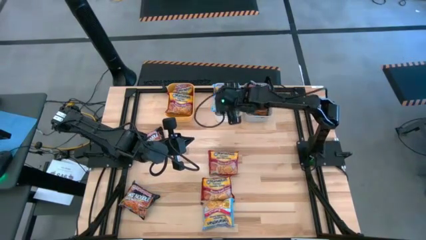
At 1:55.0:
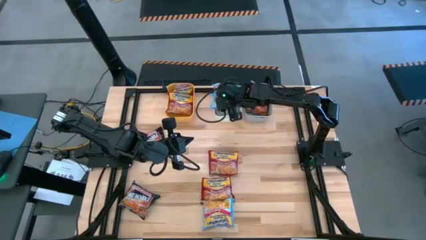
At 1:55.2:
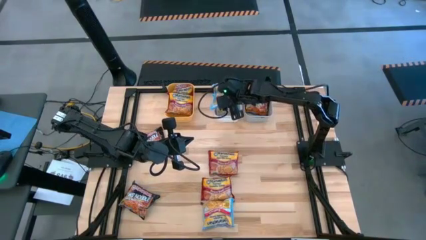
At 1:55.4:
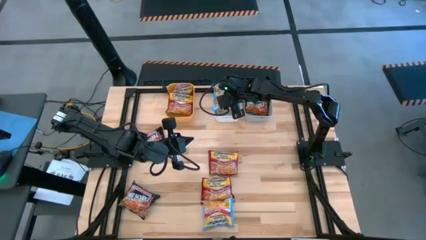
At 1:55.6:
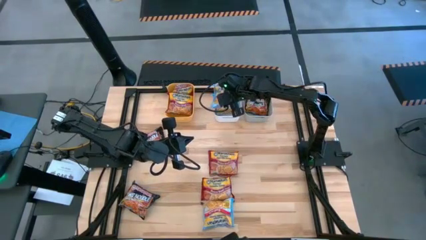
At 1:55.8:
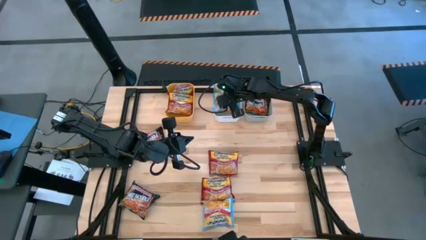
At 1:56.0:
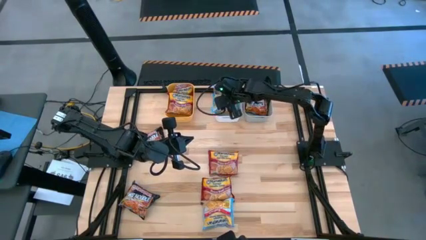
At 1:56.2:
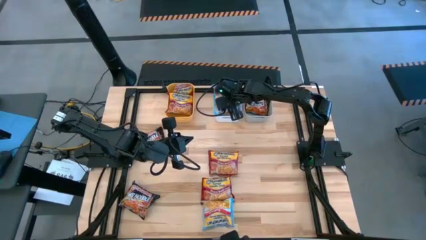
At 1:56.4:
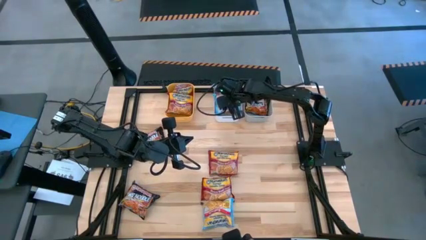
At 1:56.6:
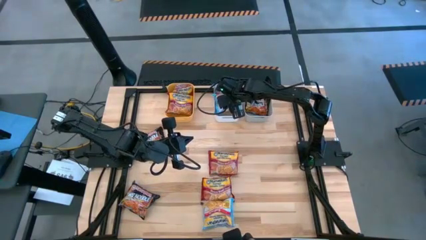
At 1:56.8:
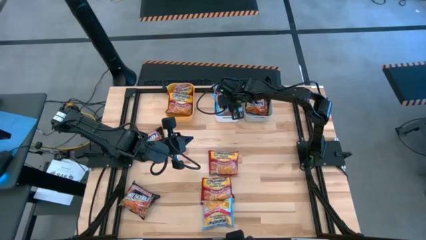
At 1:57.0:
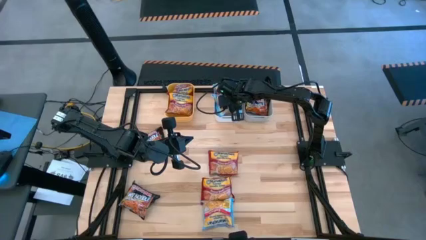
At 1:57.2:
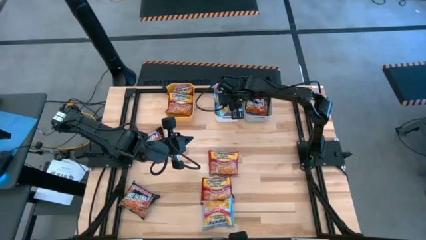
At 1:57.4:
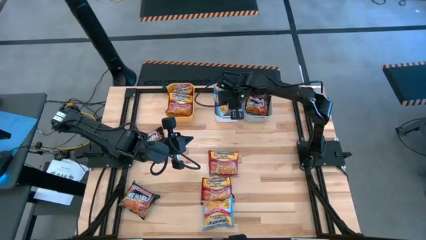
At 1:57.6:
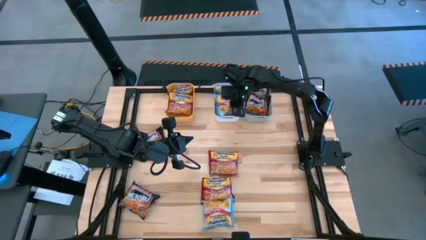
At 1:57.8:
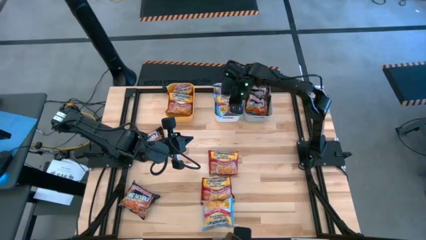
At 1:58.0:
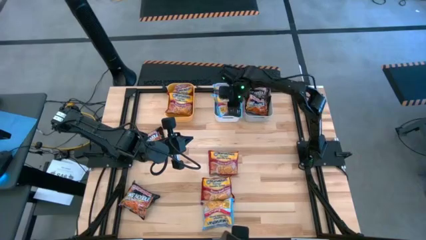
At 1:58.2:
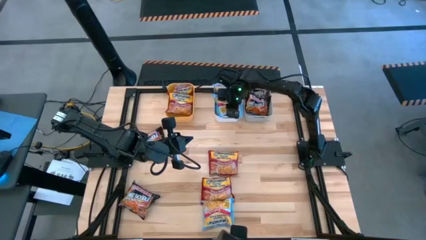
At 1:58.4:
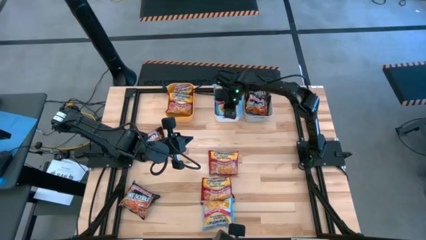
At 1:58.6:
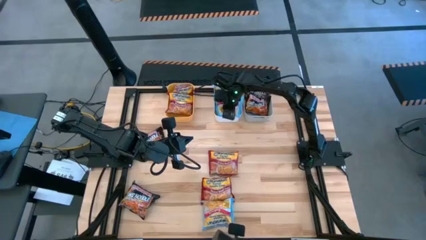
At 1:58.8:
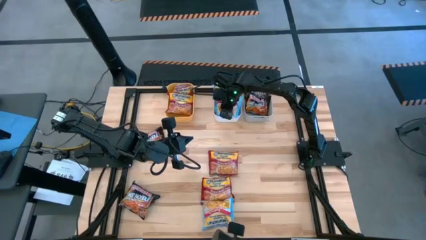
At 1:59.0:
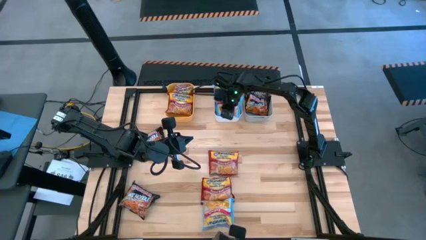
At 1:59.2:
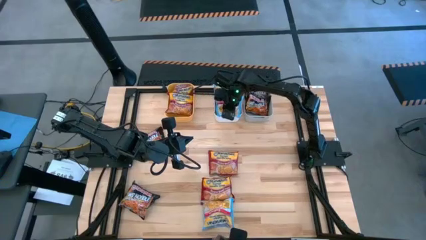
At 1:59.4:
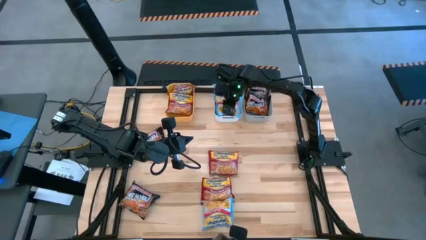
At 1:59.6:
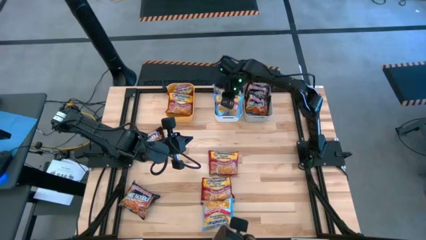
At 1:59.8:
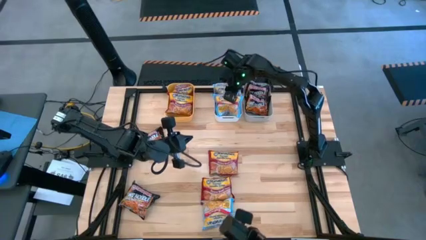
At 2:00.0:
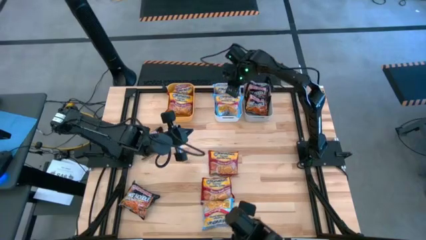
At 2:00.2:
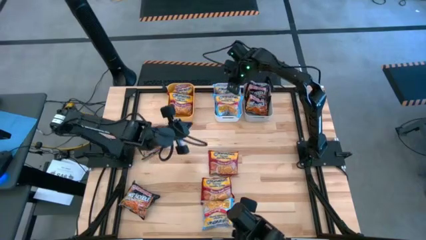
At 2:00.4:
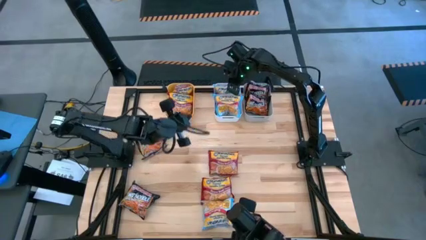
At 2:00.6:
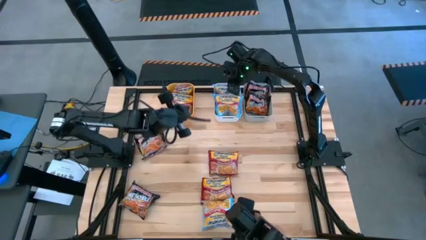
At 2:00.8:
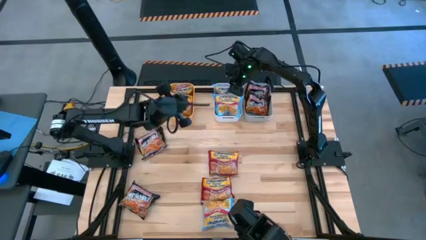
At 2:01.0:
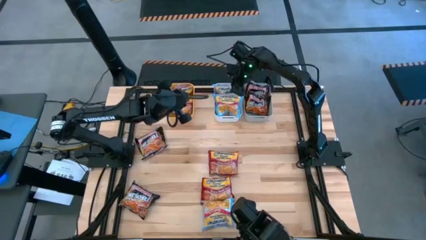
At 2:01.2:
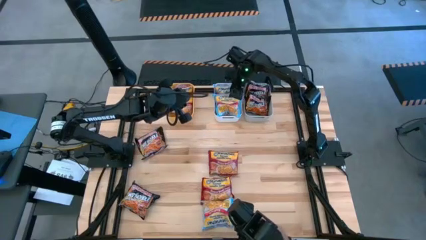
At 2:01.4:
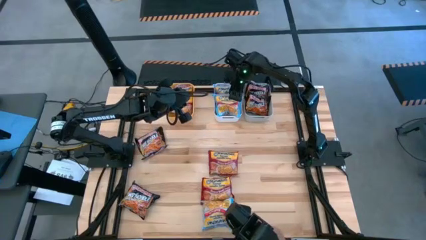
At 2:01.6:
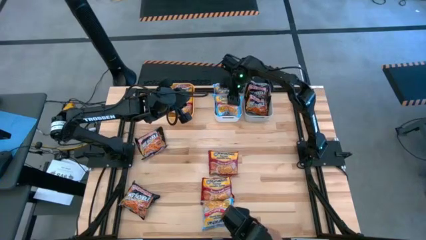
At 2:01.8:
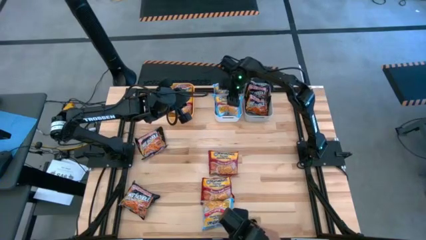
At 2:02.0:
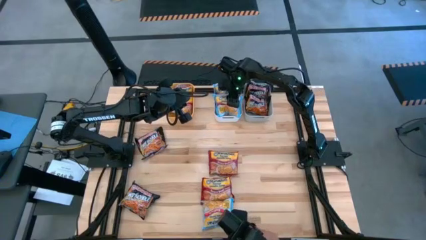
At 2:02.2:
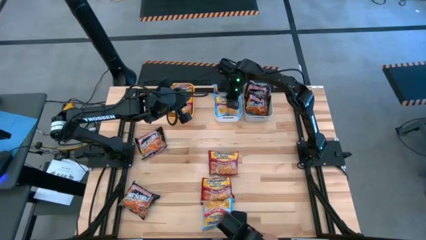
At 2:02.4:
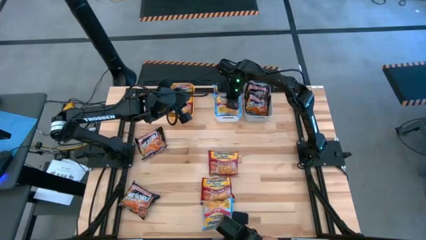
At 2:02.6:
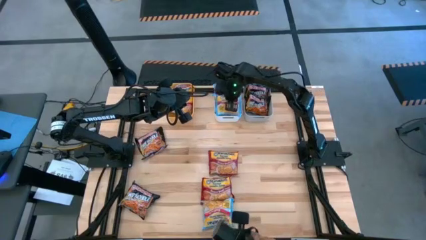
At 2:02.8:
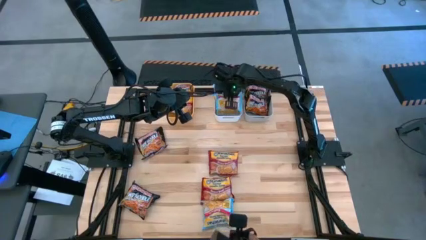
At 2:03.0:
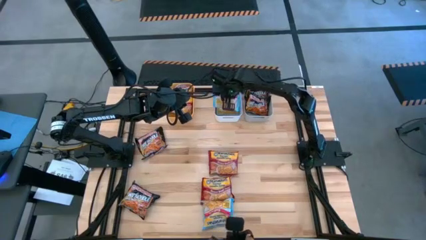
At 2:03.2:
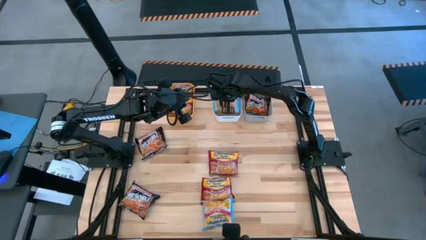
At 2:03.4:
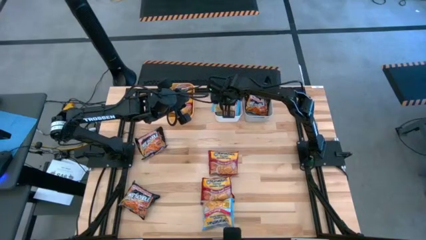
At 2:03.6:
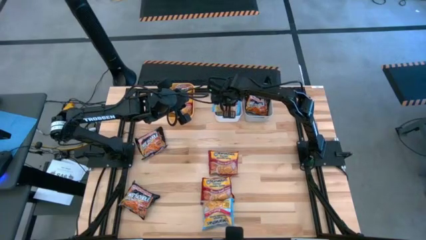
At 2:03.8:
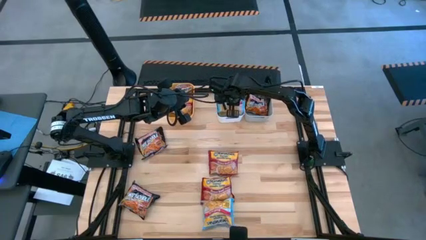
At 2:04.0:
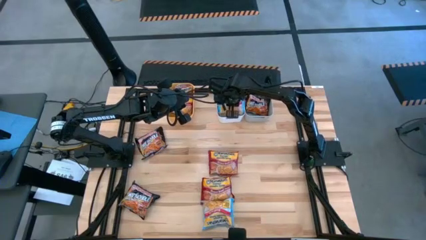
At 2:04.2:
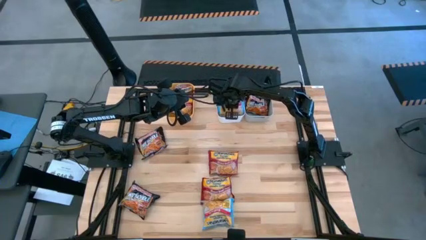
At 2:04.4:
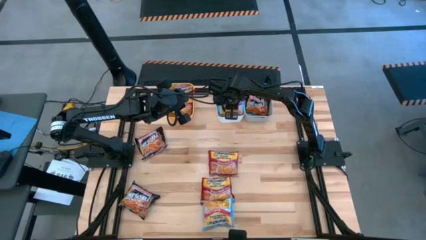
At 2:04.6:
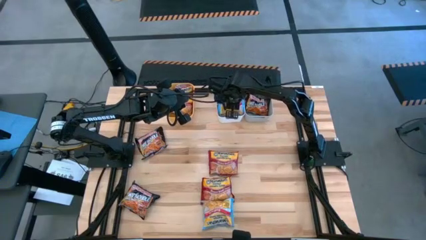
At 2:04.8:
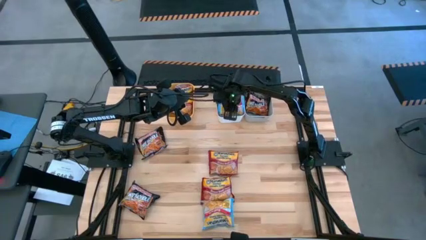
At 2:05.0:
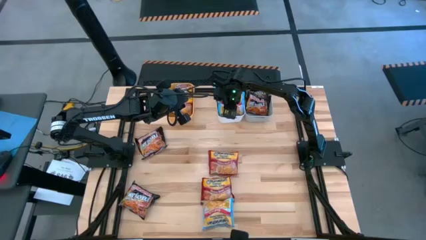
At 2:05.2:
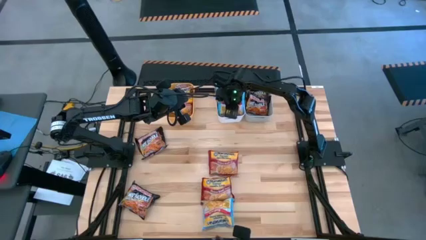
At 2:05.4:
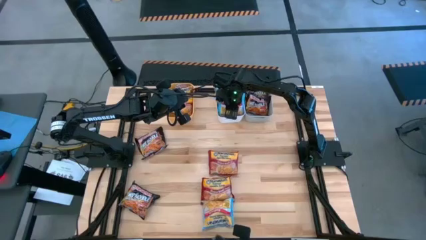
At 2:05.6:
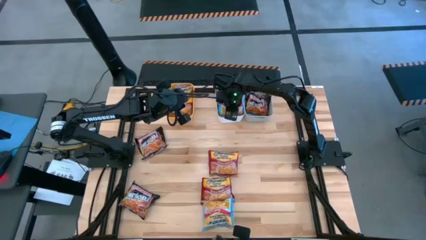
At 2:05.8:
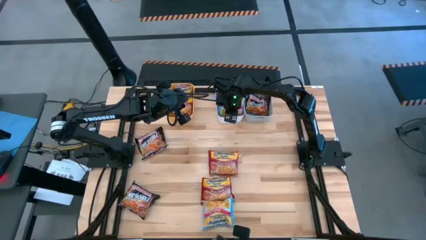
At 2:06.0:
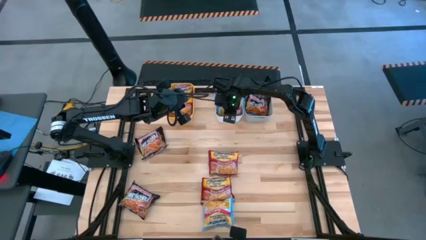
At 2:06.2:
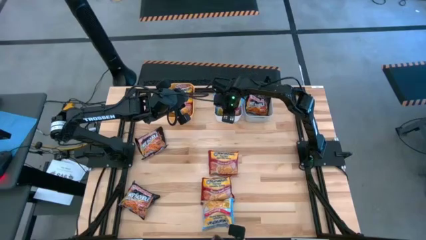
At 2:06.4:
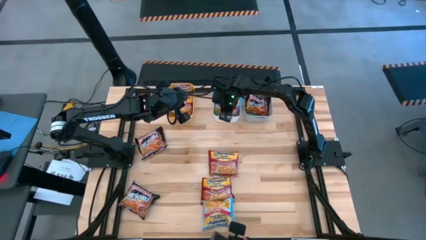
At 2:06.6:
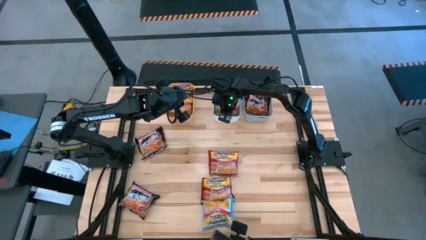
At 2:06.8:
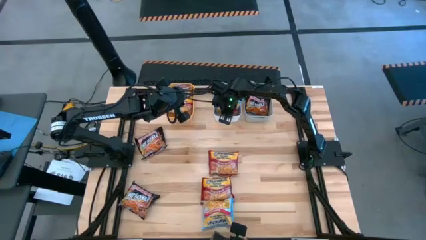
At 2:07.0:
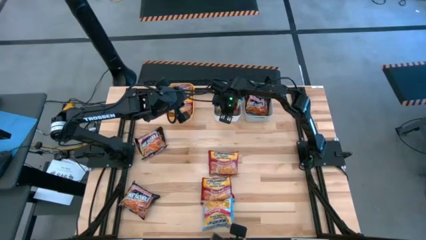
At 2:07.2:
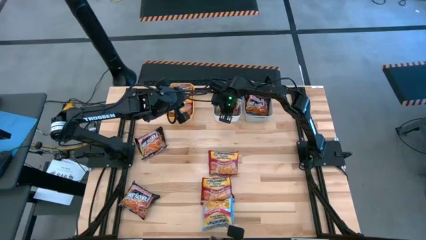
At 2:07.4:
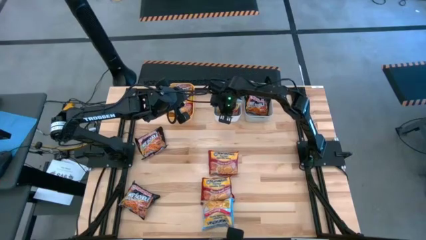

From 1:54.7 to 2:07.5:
Task: Sort Maruchan noodles
Put the blue noodle pack into the white bin

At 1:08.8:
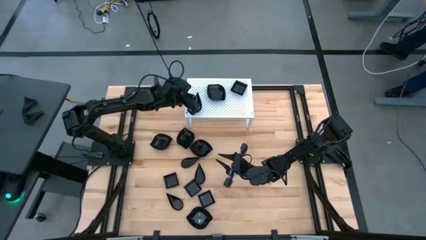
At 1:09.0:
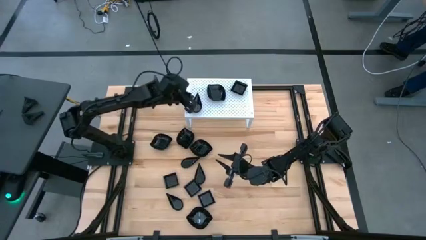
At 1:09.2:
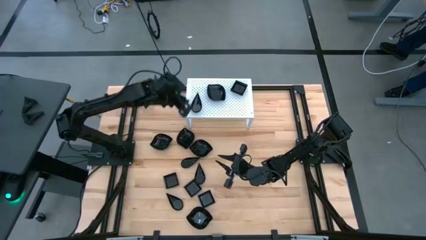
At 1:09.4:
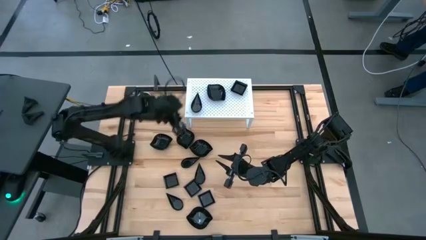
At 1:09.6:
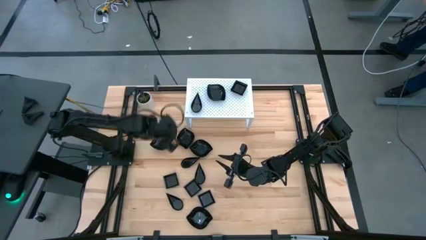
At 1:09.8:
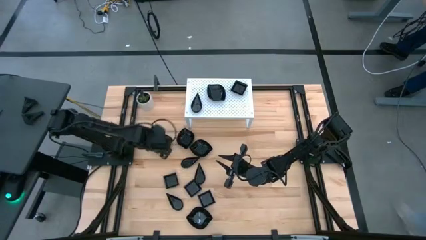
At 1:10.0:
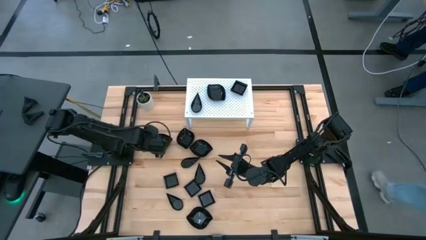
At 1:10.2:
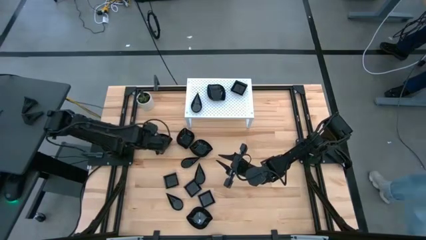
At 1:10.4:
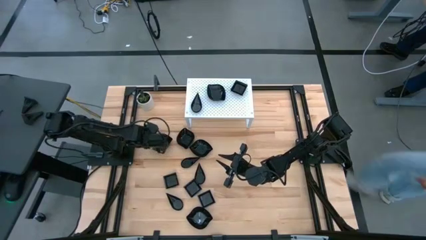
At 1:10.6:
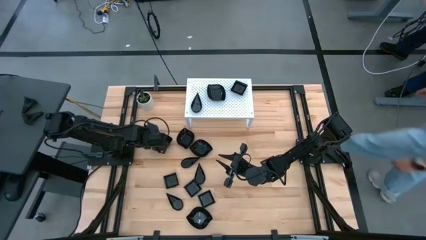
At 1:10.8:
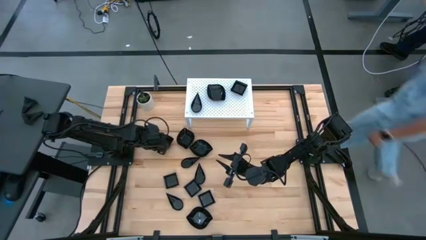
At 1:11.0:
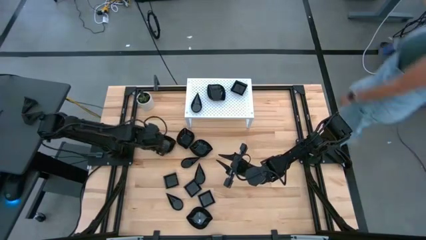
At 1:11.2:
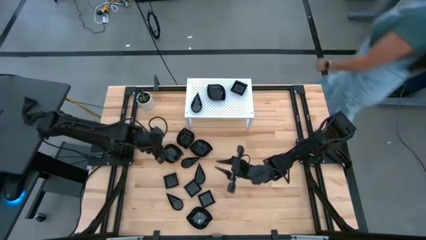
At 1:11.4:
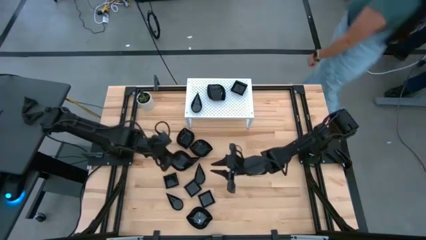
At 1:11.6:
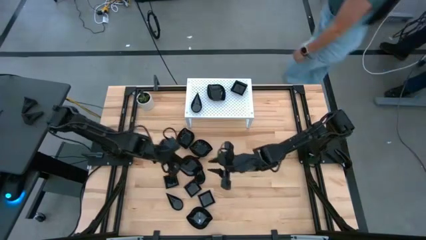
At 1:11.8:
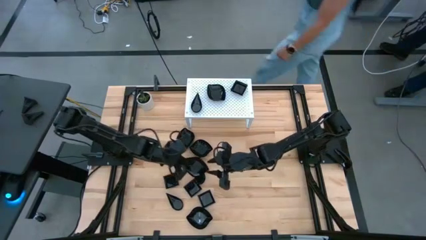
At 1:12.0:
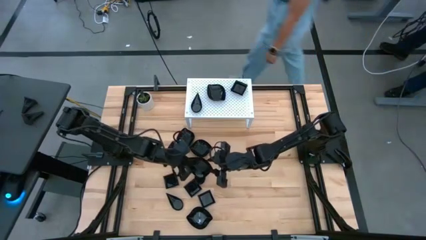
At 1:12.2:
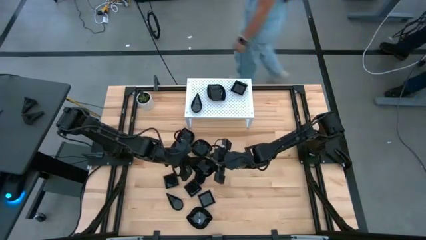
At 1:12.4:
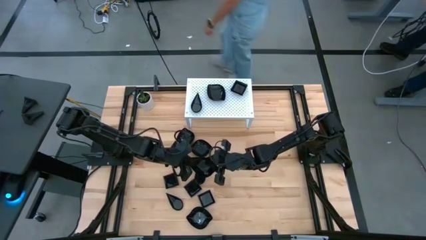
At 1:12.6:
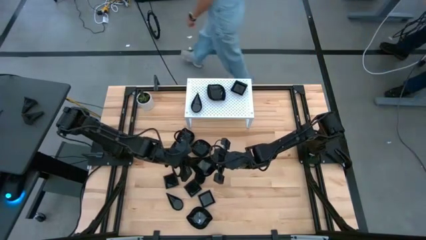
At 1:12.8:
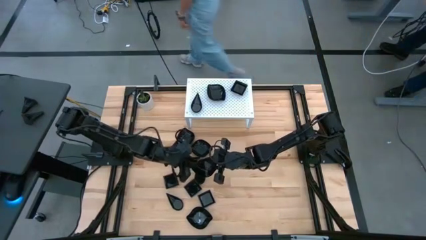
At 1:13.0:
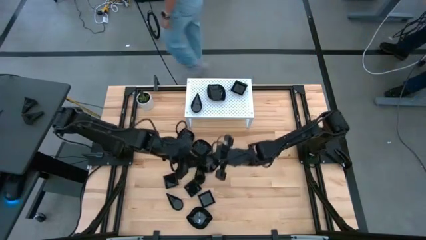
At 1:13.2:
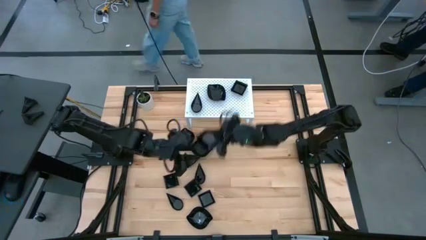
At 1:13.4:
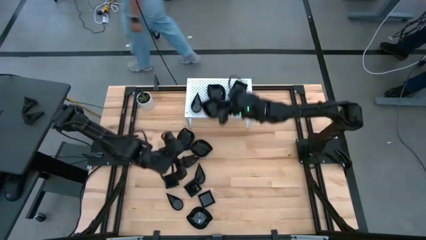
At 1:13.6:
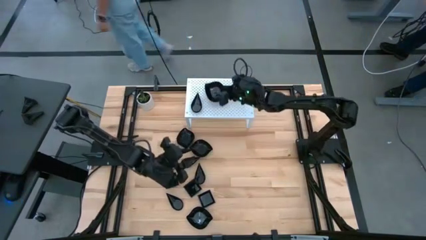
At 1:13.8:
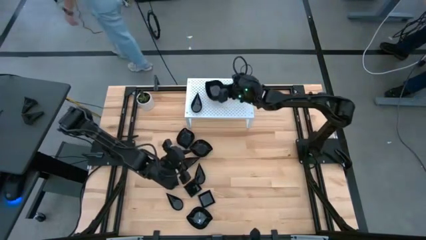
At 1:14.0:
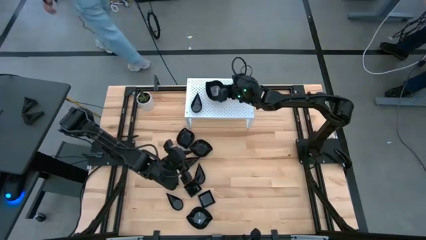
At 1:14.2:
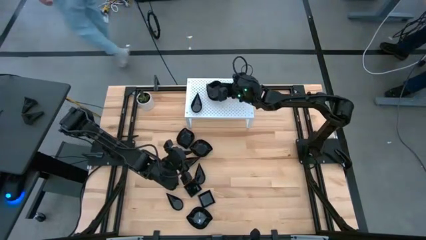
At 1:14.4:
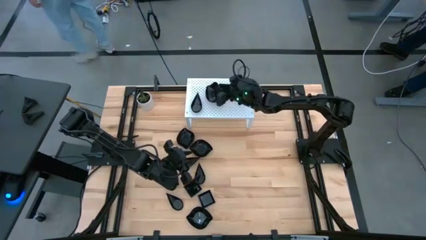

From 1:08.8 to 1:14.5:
Task: Pick & Place Mini shaped plates
Stack the black leaf-shaped plate on top of the other black leaf-shaped plate on the shelf
